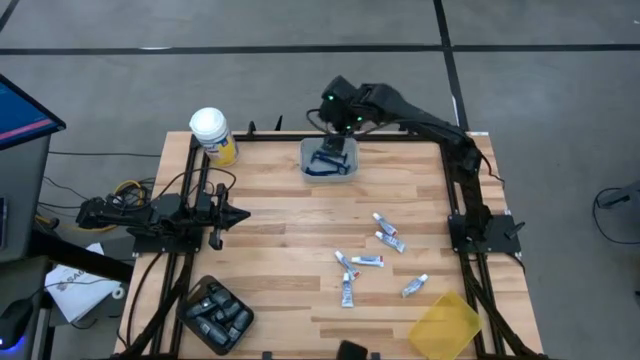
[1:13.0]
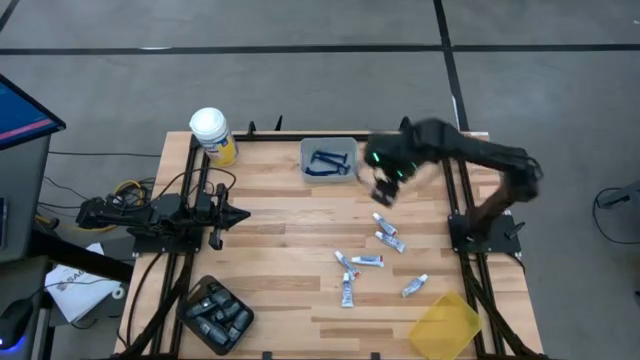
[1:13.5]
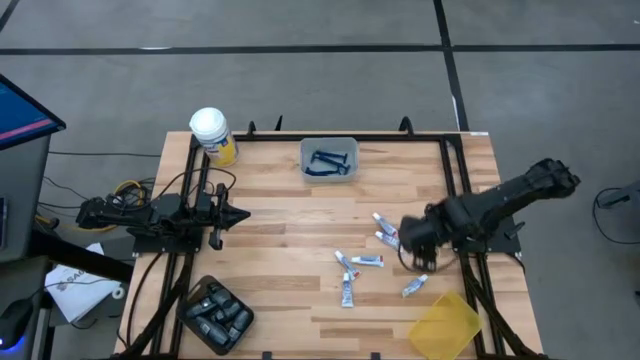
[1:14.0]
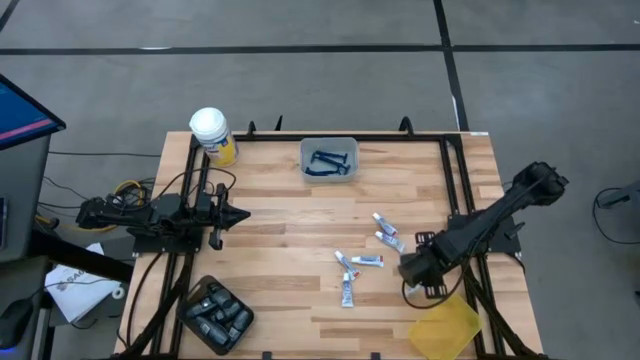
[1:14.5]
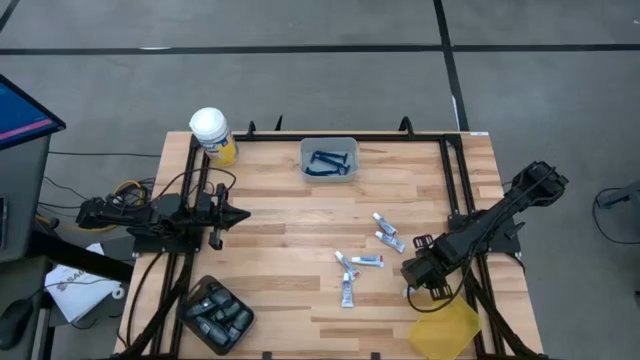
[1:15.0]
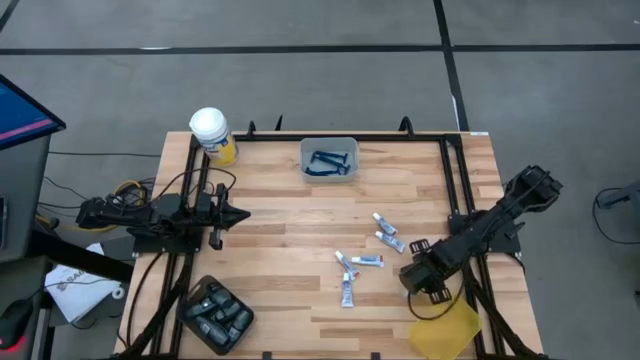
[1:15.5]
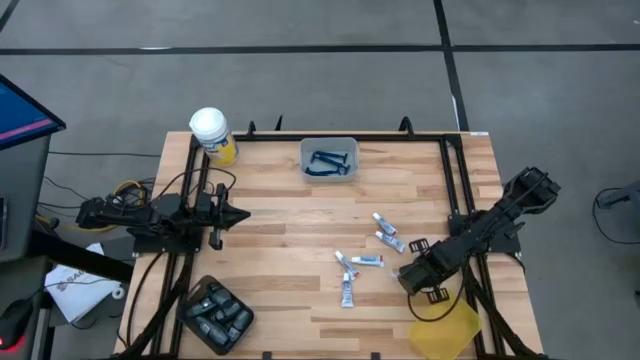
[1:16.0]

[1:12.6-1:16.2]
Task: Pick & Place Travel size toiletries
Put the white toothpaste into the yellow bin

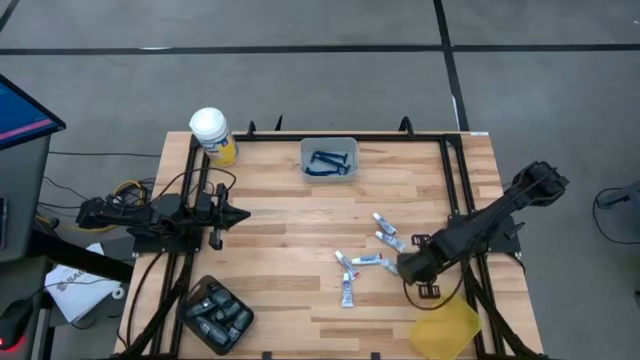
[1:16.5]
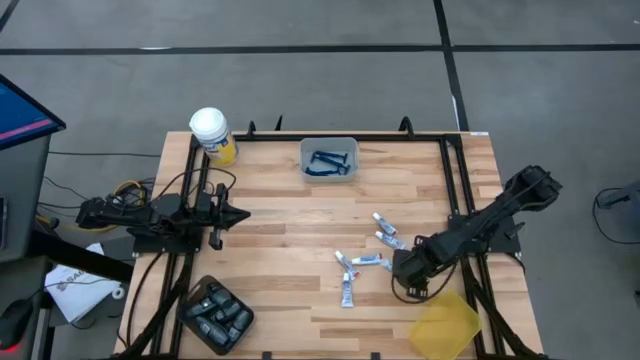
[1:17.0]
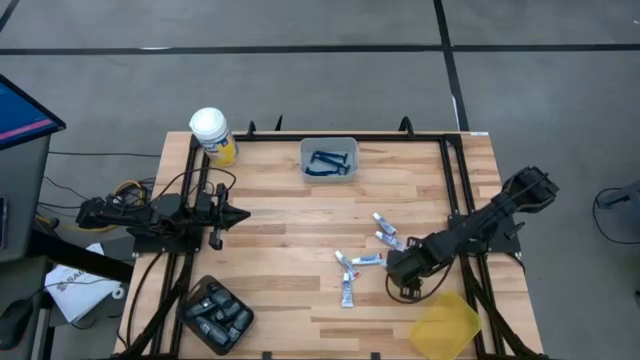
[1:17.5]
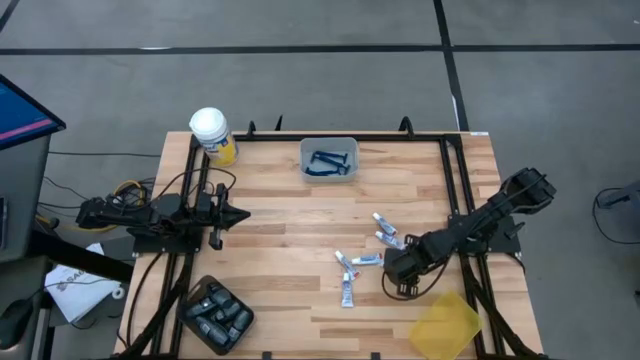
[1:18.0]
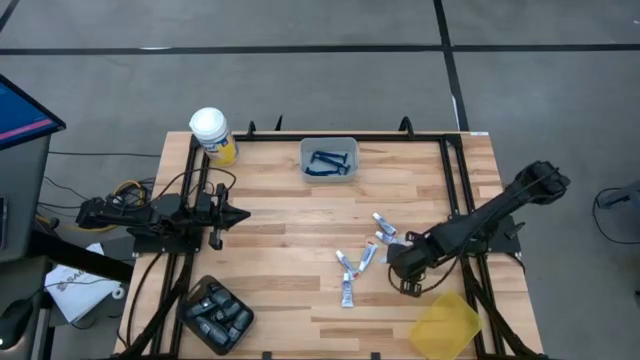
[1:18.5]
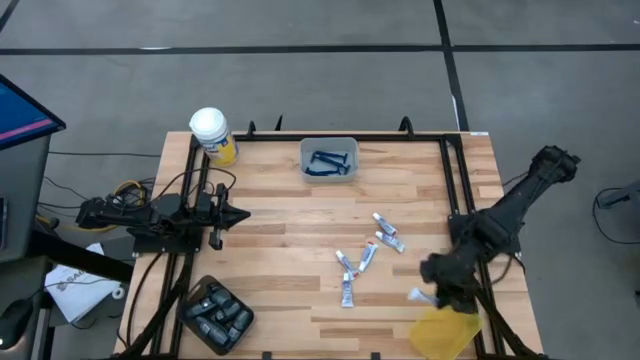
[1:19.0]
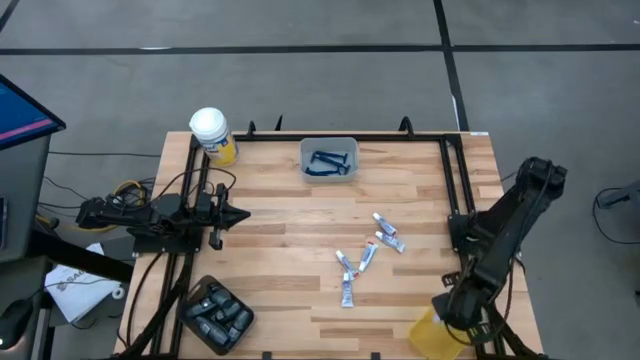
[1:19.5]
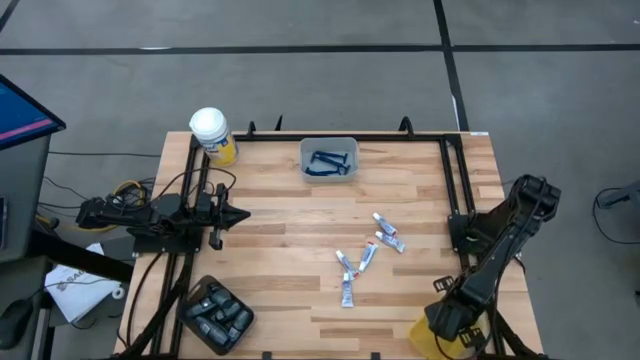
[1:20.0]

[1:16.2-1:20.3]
Put the white toothpaste into the yellow bin

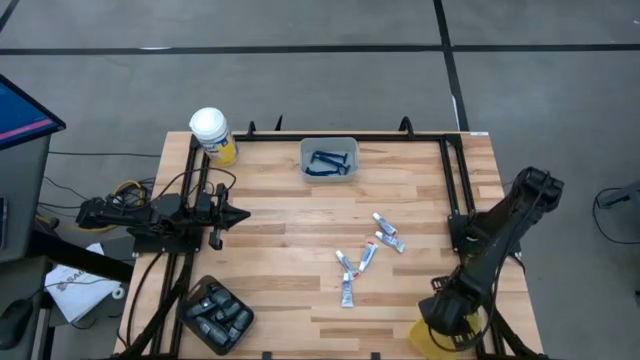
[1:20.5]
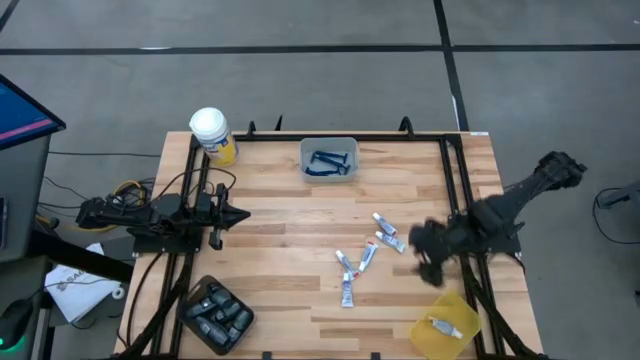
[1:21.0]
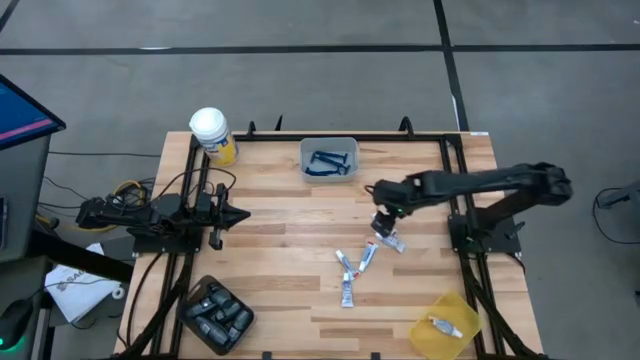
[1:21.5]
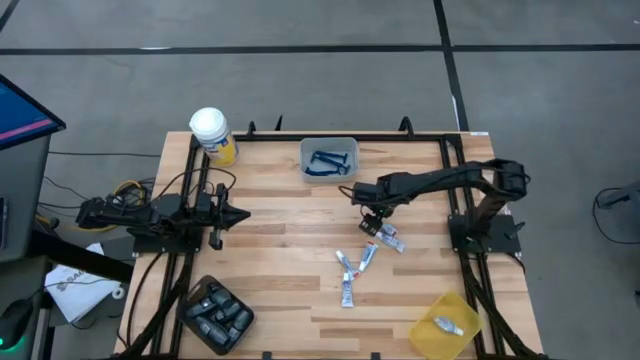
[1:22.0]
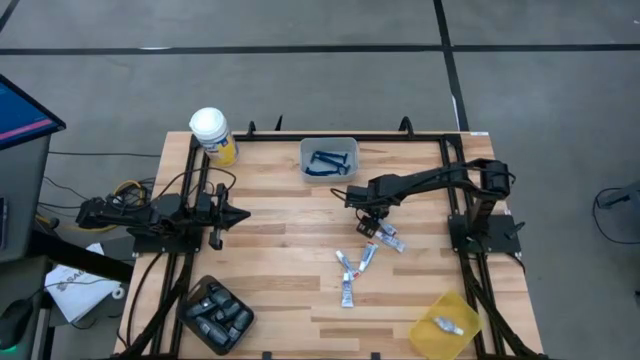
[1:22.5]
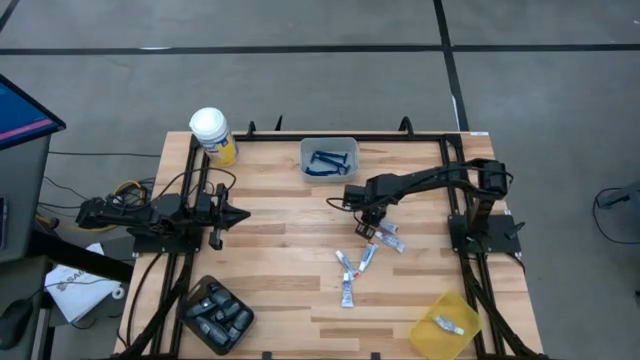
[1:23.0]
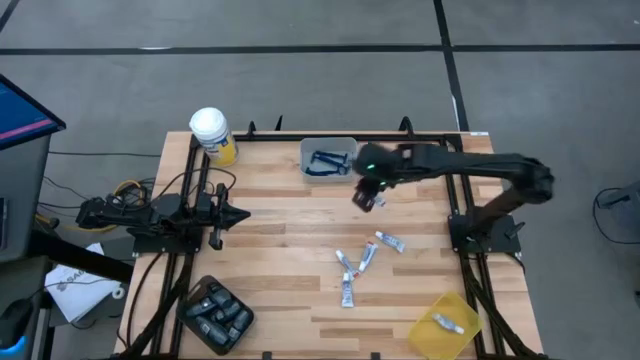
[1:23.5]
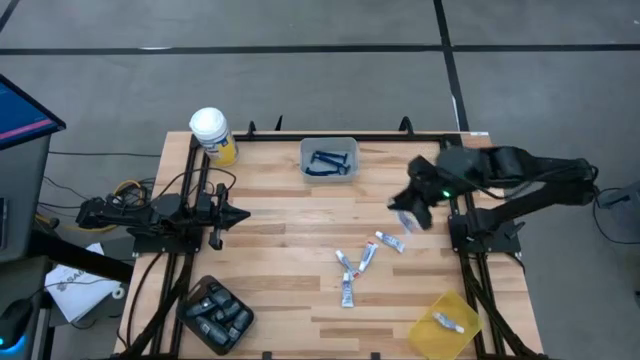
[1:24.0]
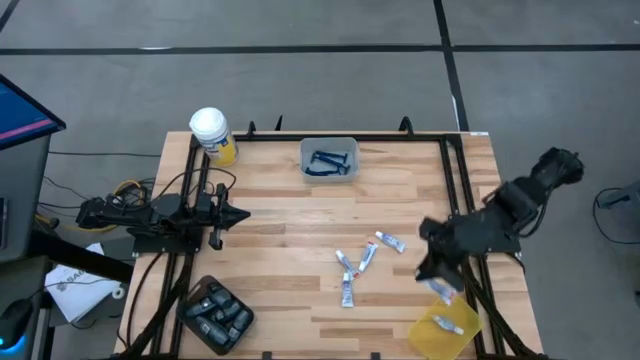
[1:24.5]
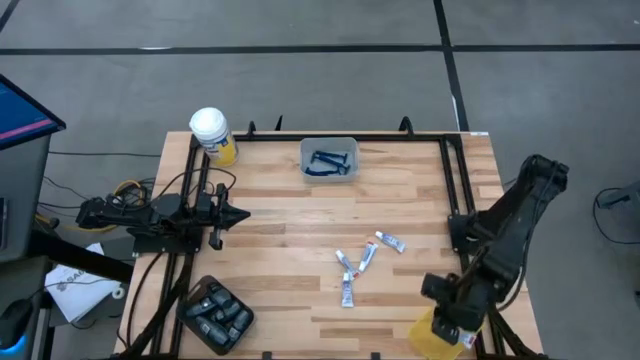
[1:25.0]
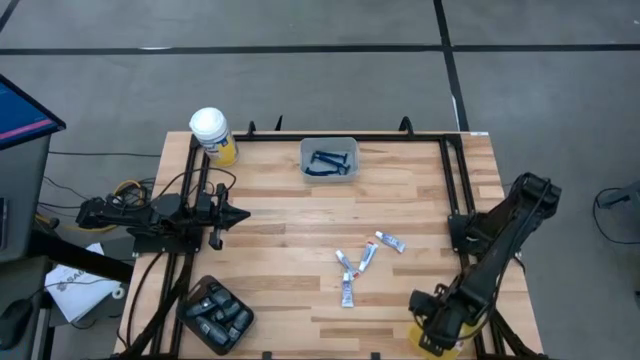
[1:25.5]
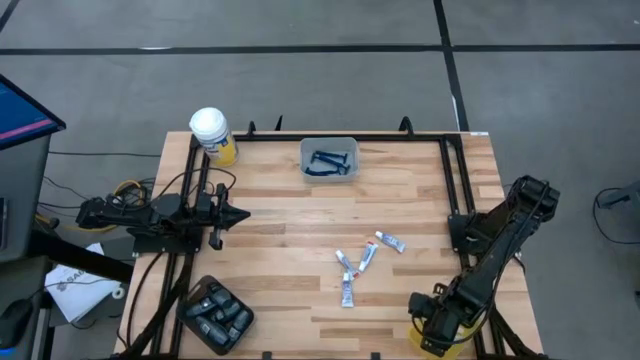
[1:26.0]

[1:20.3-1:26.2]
Put the white toothpaste into the yellow bin

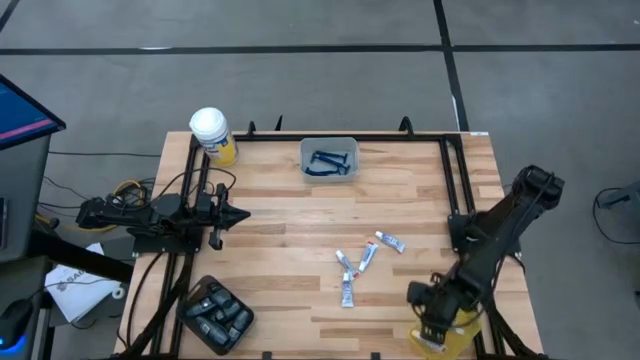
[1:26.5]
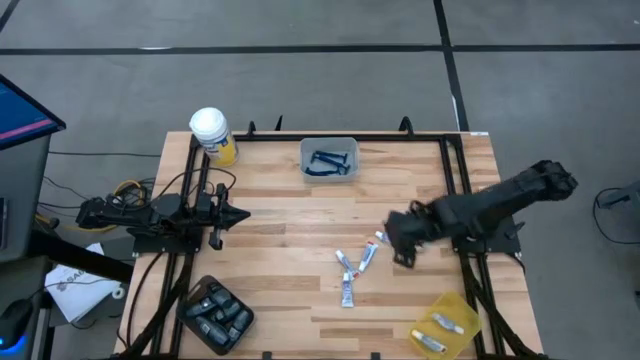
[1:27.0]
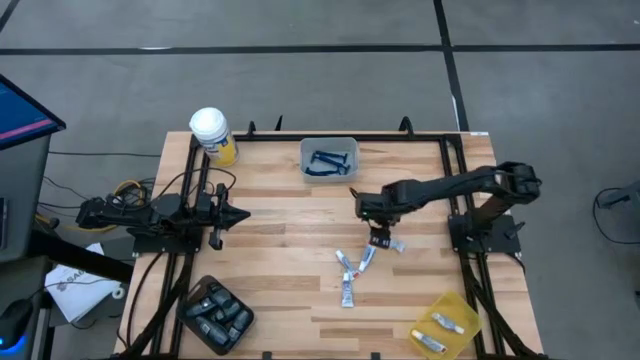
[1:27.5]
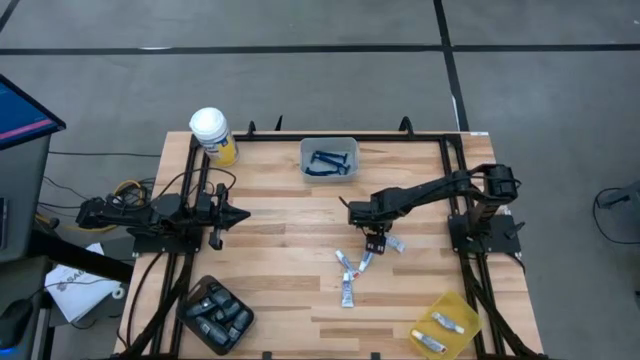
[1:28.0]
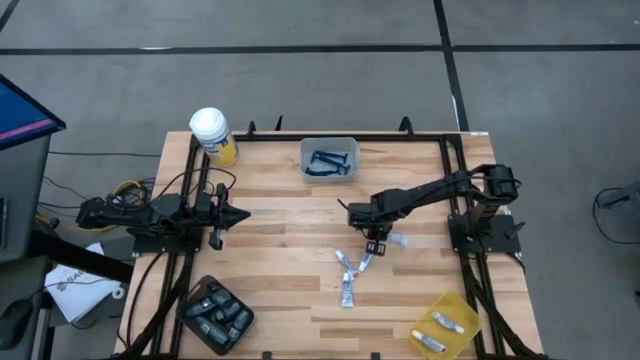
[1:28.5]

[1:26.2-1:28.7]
Put the white toothpaste into the yellow bin

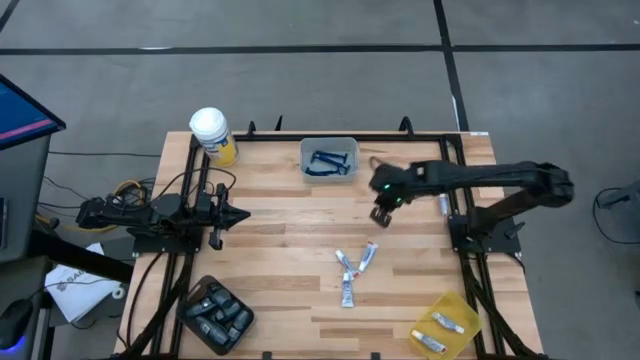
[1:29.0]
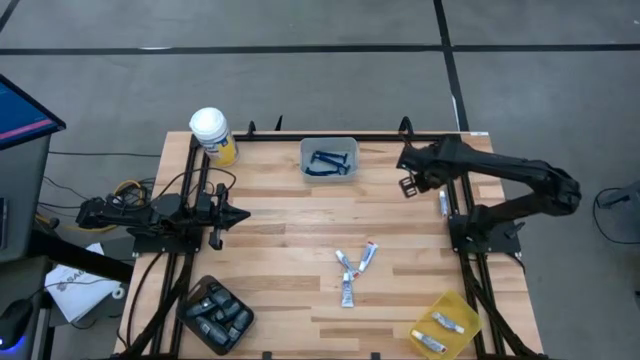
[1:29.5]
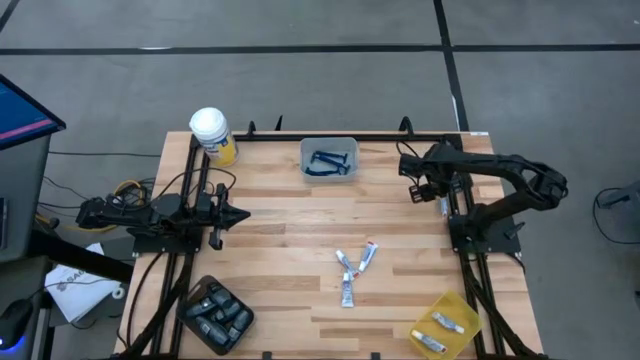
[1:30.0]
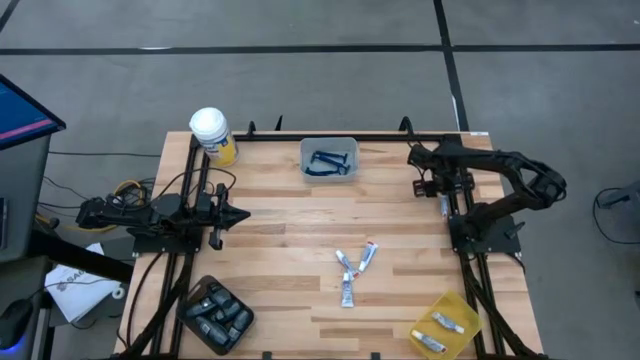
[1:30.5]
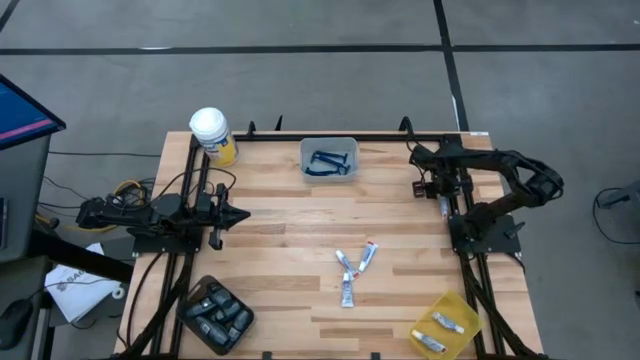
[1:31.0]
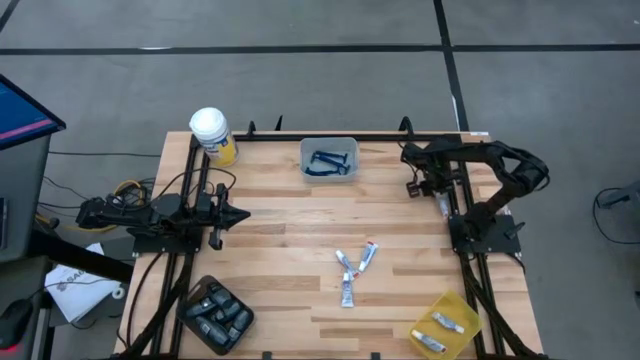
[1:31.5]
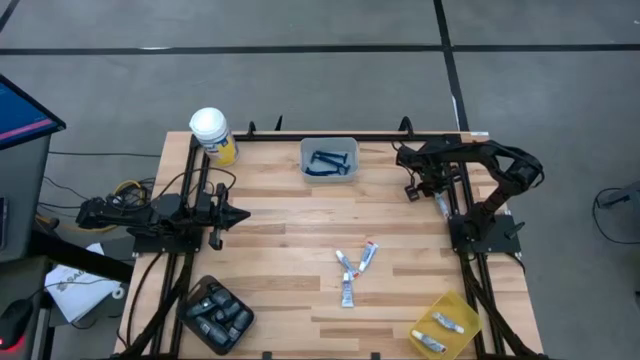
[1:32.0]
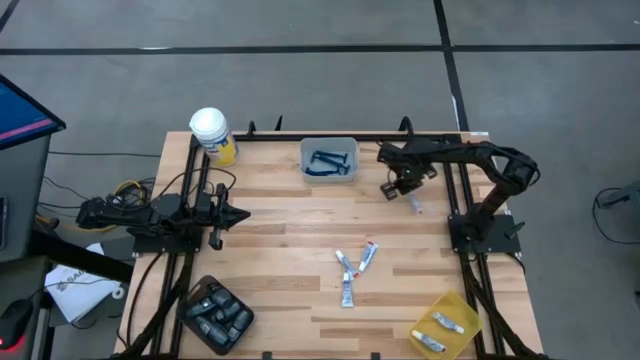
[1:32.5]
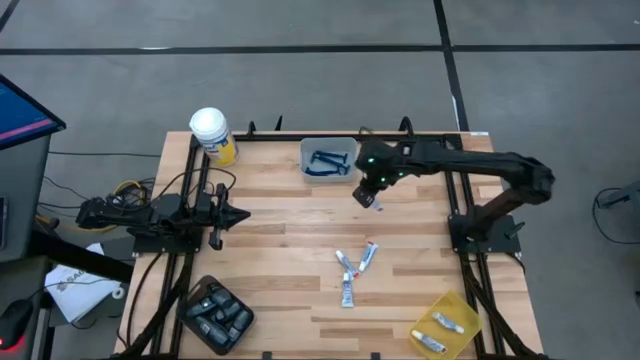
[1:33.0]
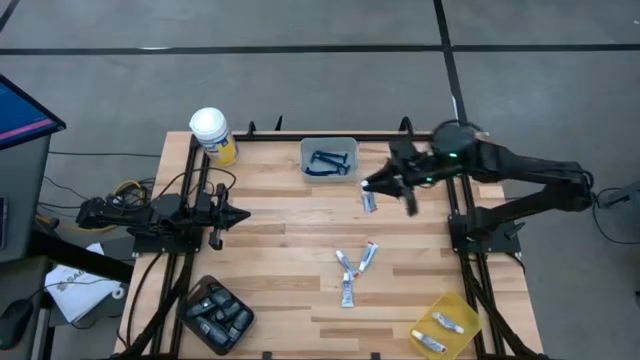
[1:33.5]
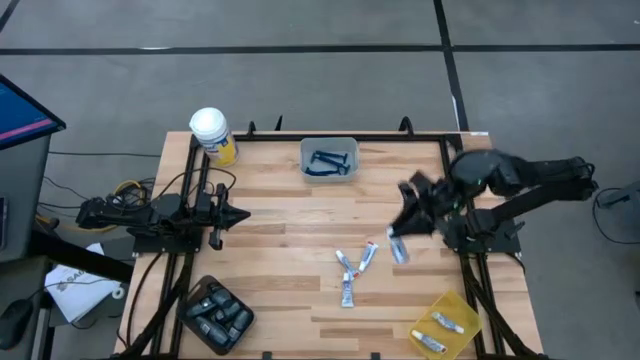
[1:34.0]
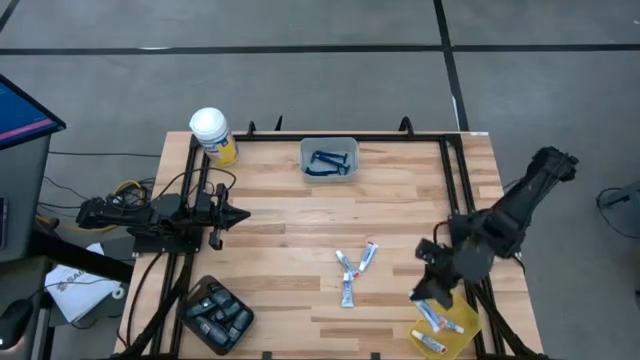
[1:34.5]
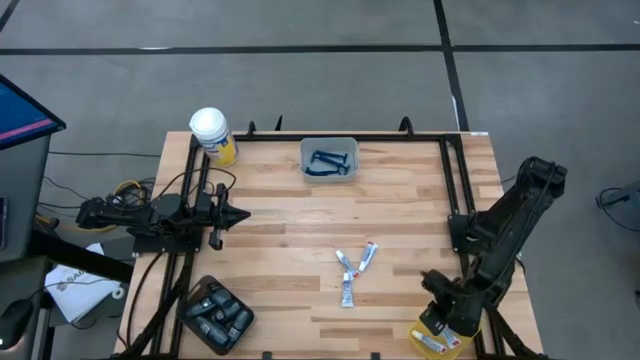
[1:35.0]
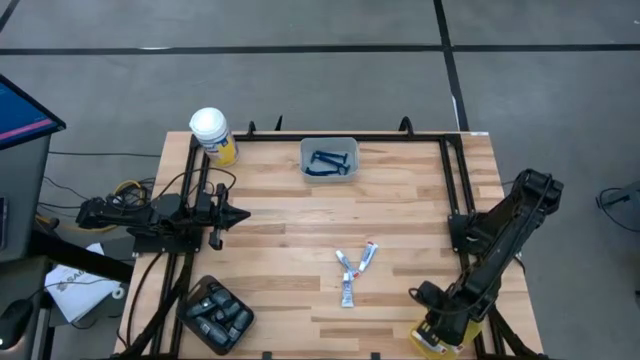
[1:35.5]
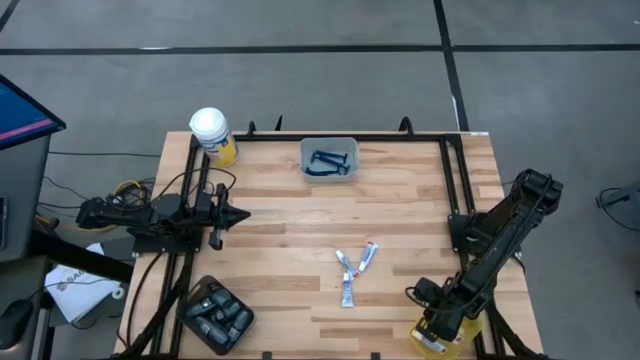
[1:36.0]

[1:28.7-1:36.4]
Put the white toothpaste into the yellow bin
